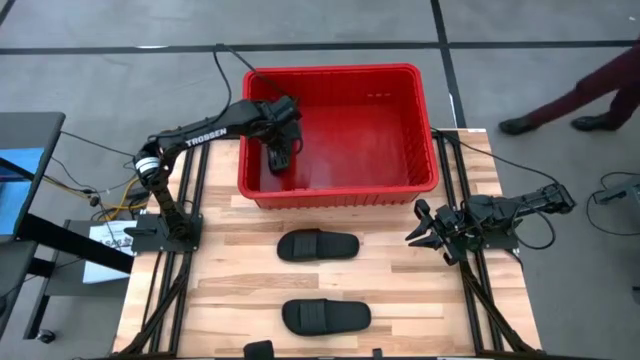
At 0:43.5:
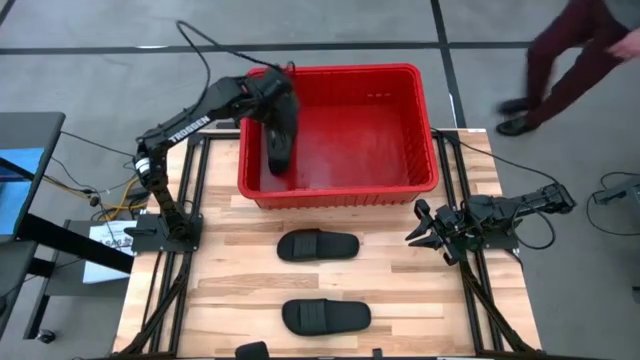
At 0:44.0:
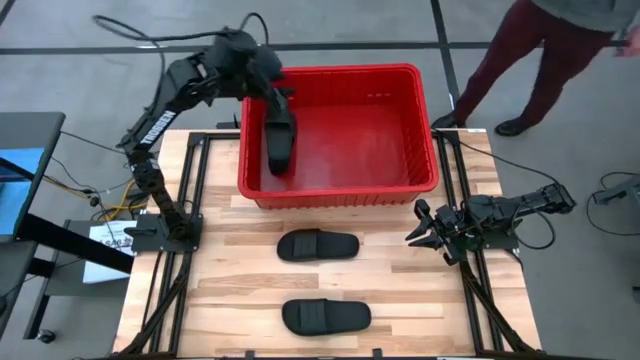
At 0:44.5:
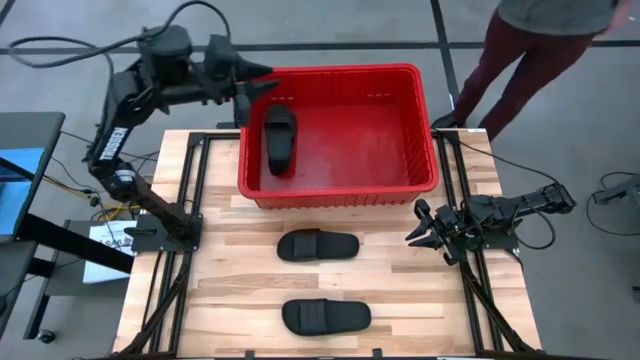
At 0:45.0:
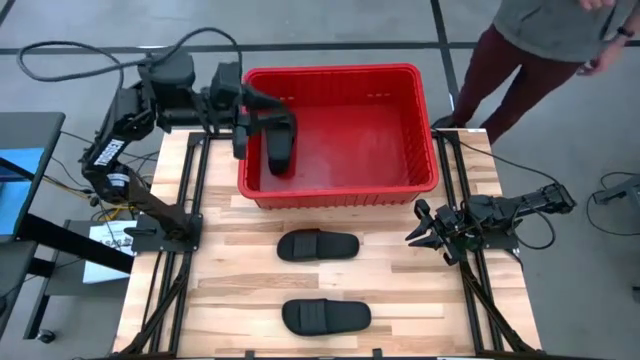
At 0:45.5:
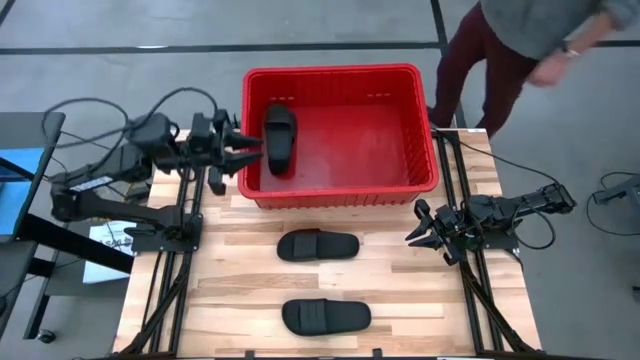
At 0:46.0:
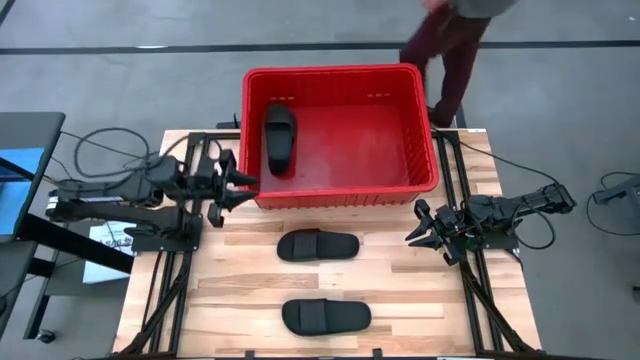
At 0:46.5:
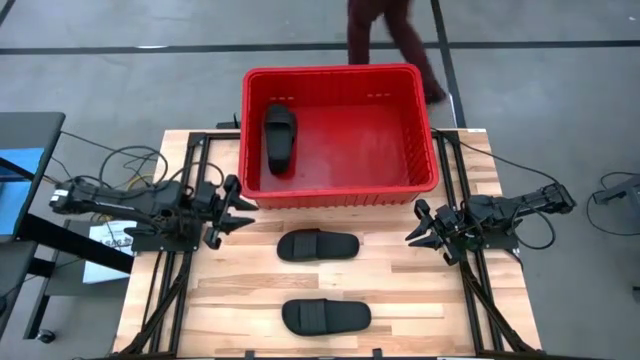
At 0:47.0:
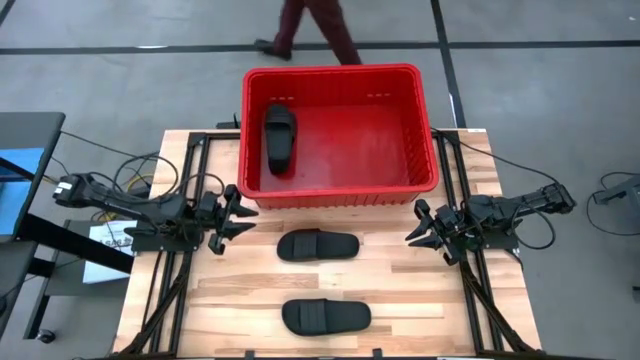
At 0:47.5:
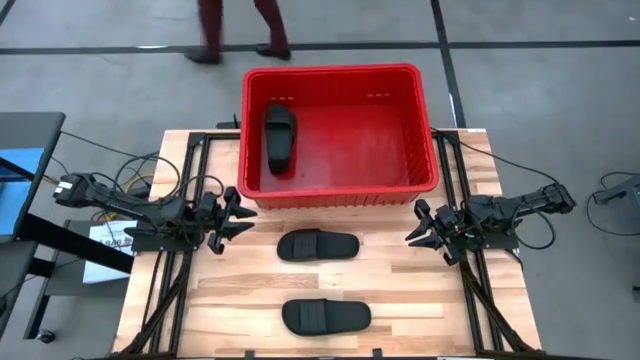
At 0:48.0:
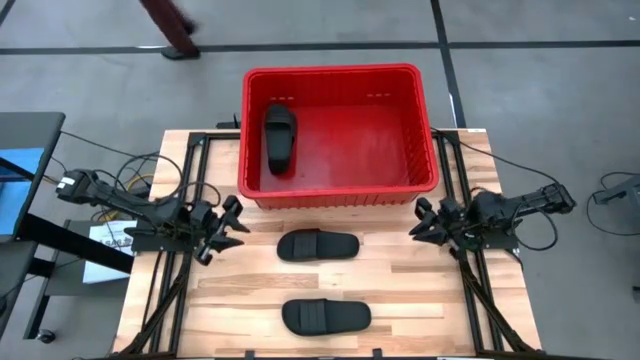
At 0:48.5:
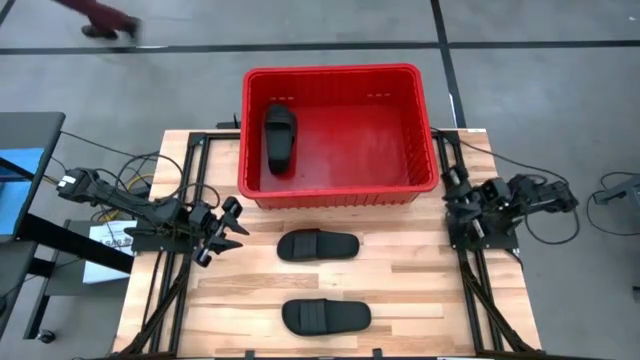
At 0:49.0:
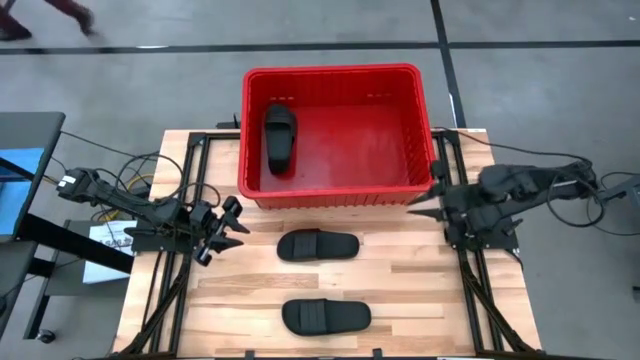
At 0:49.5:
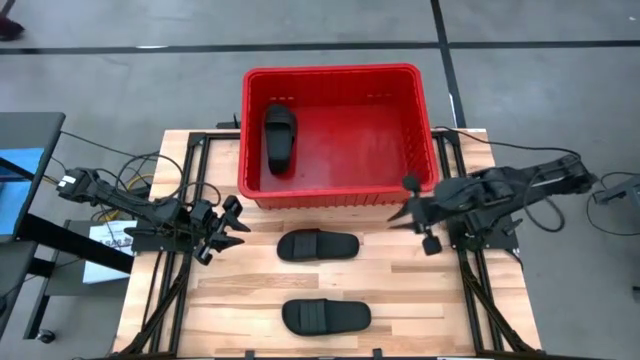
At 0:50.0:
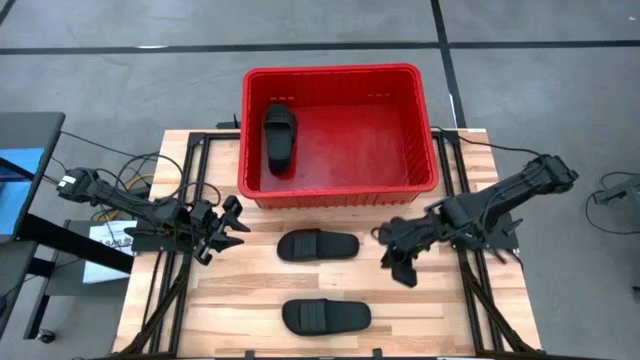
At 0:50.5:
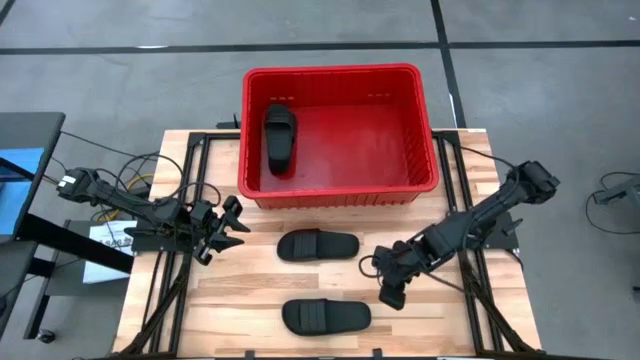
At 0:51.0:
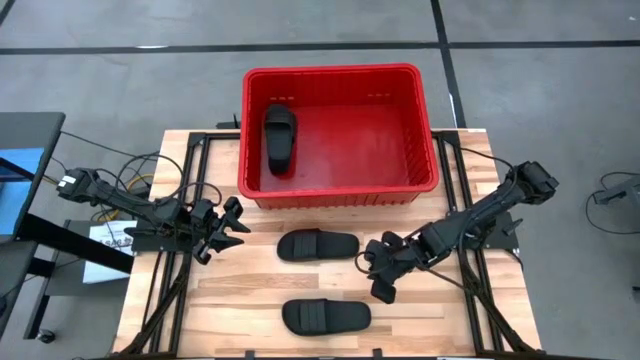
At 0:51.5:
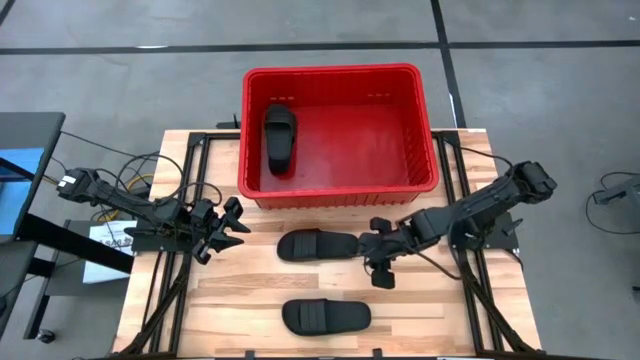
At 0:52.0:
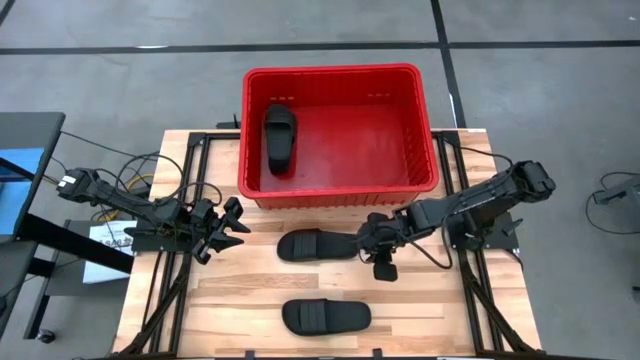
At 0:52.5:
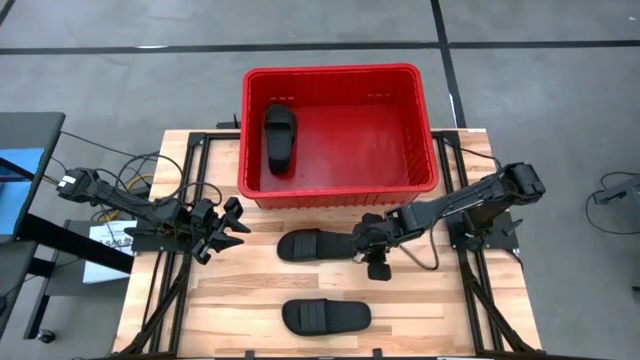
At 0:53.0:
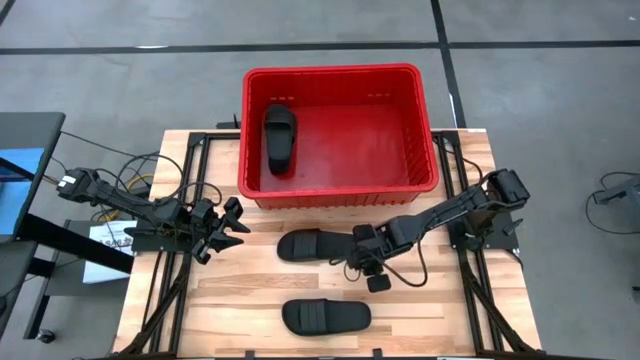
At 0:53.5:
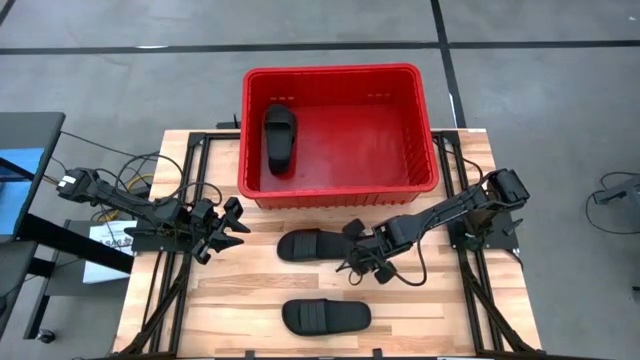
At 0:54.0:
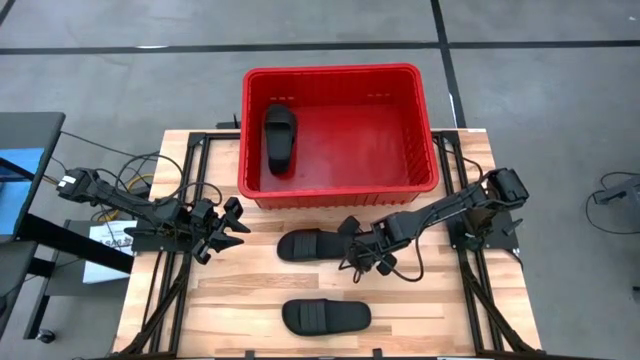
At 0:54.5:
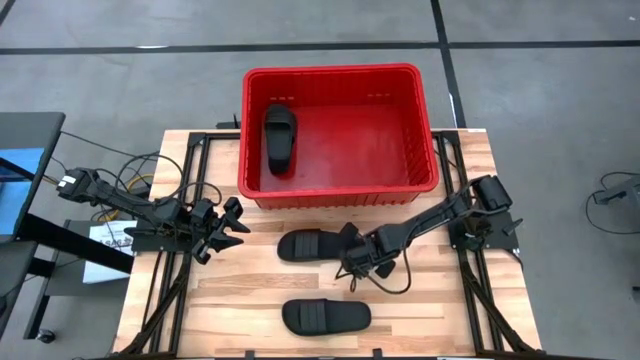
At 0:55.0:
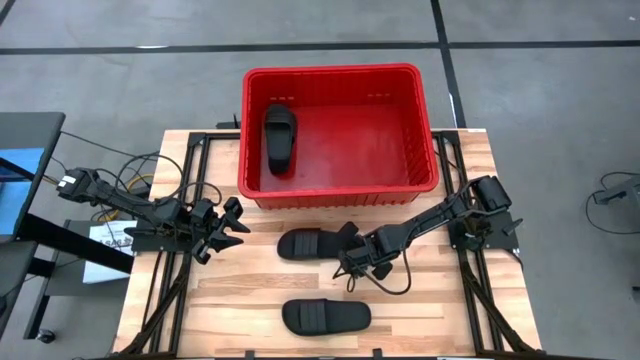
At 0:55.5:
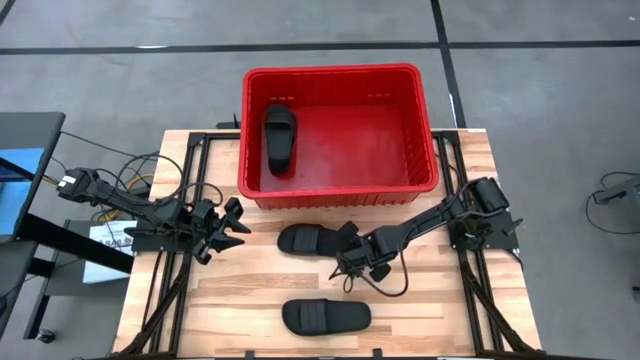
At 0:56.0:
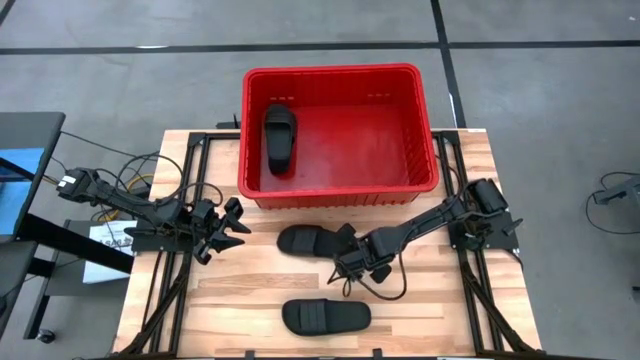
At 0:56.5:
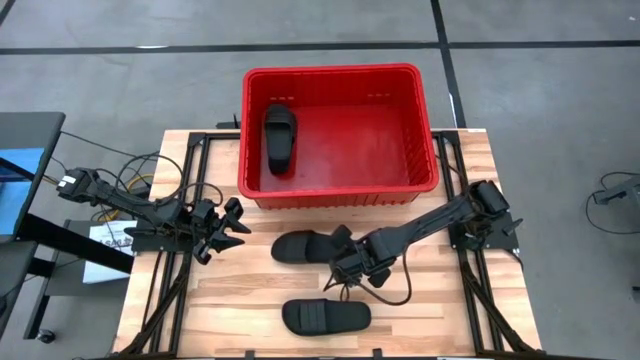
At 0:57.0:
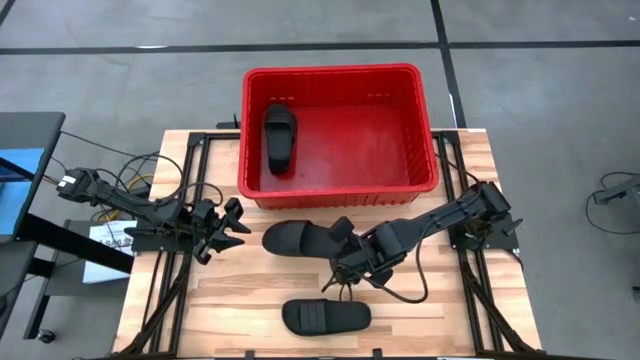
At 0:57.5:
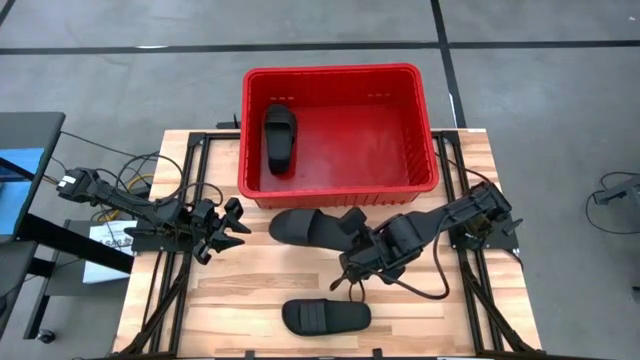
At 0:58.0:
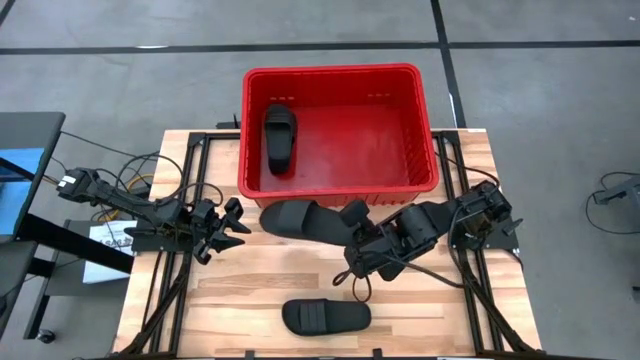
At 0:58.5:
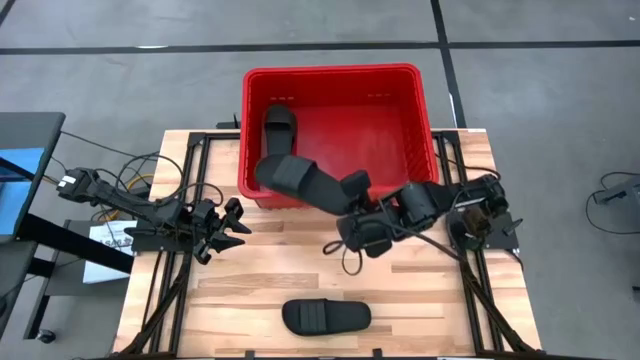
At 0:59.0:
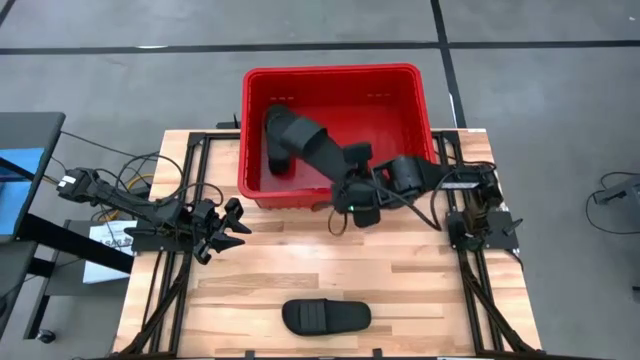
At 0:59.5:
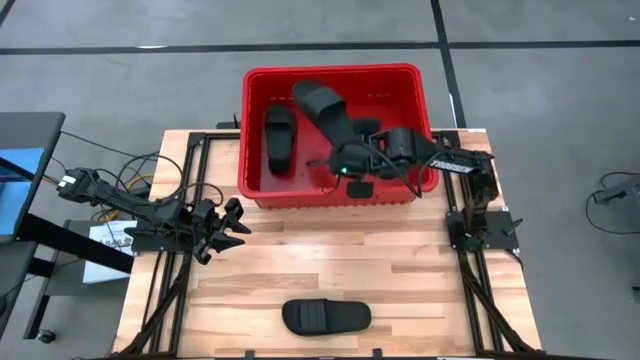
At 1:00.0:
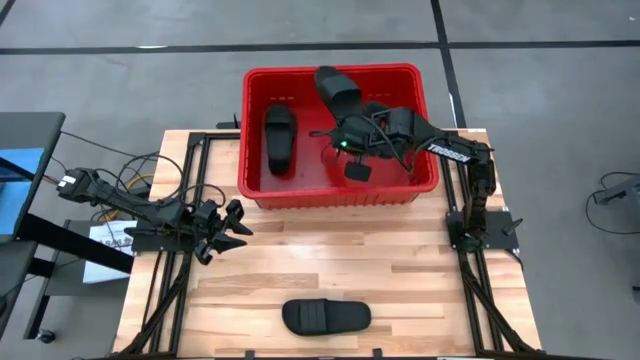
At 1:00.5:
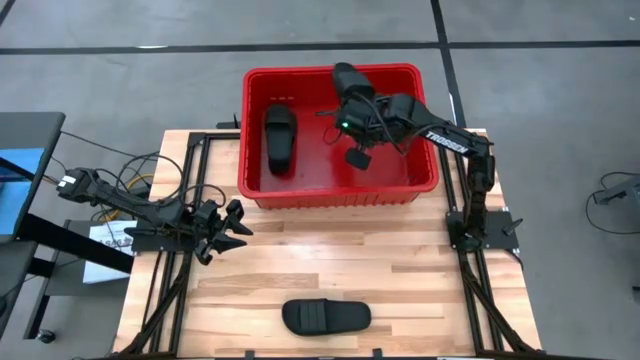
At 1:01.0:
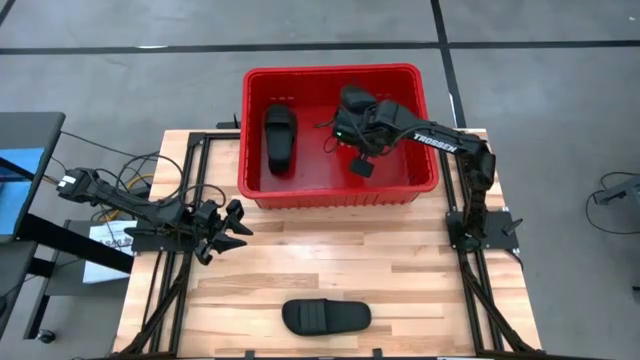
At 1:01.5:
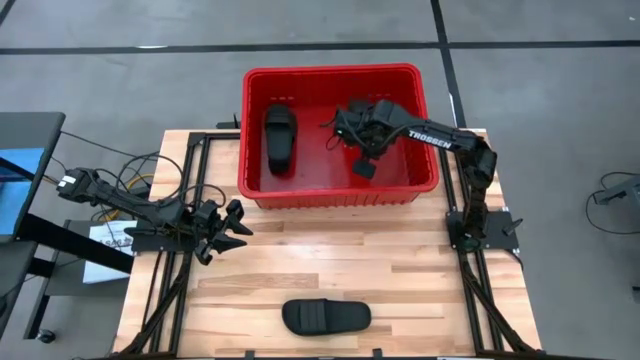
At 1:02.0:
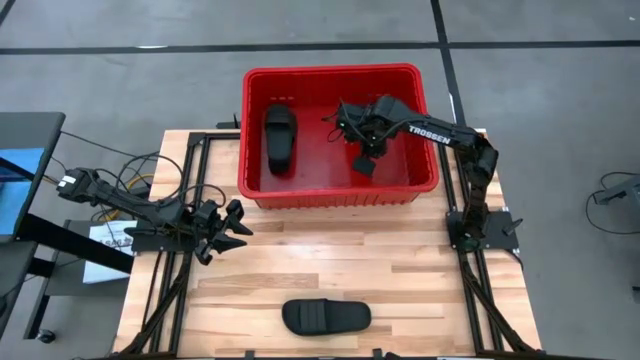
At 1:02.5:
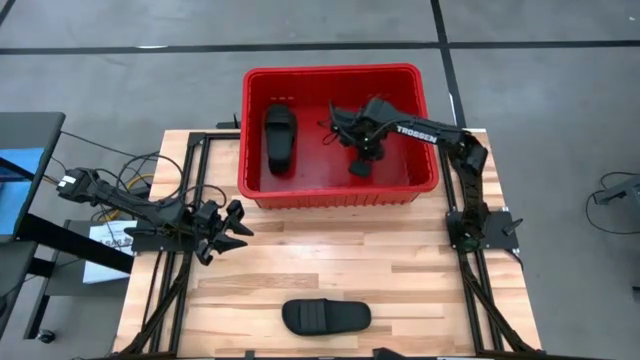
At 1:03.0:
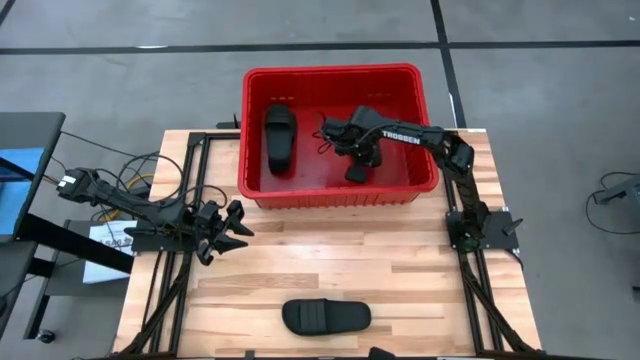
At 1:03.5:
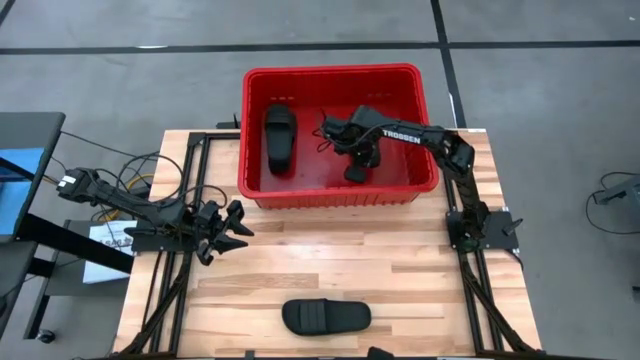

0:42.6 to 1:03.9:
Task: Pick and place slides into bin
Put the black slipper into the red bin

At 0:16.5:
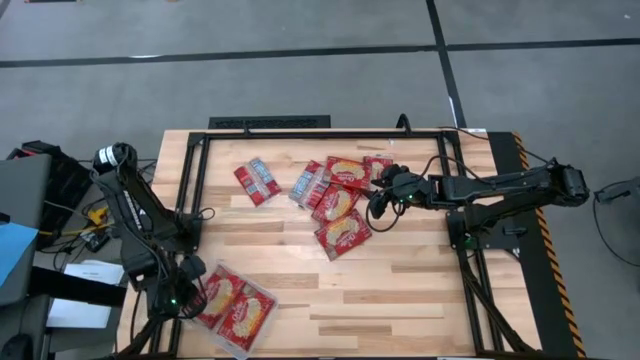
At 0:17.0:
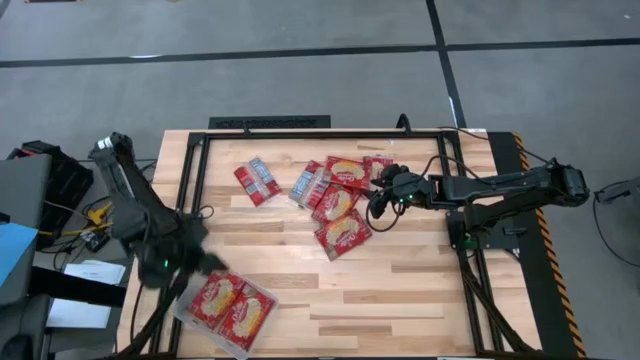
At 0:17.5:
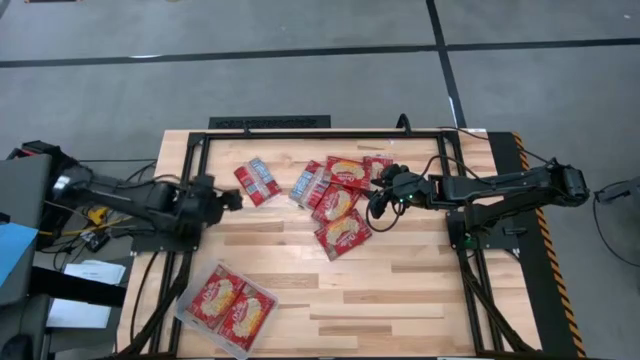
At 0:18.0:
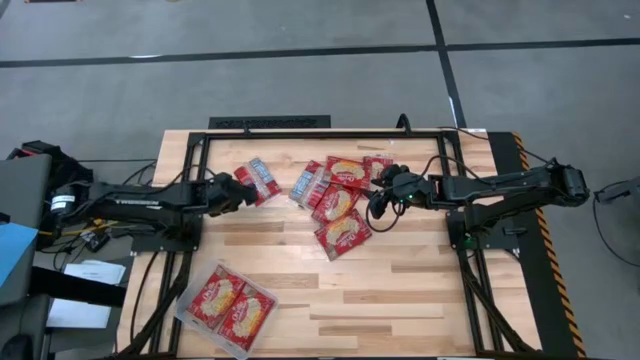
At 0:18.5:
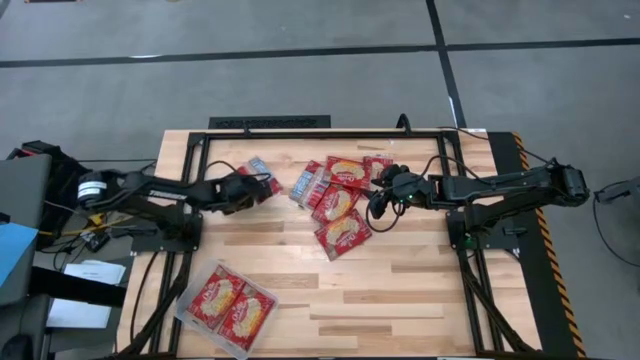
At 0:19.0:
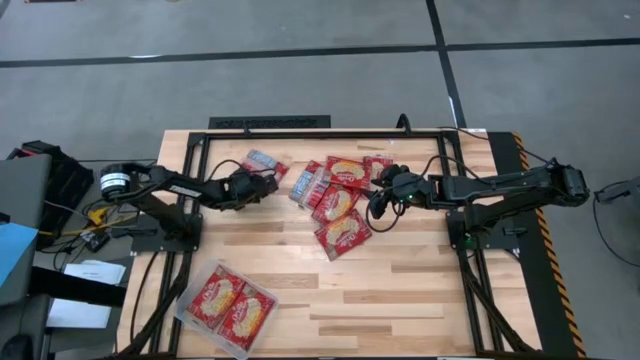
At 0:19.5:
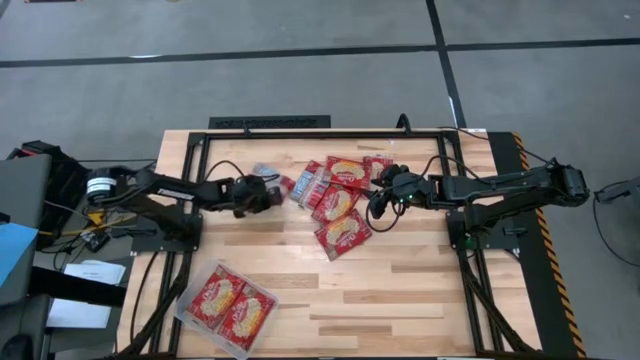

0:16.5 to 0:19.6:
Task: Sort popcorn bags into baskets
Put the red popcorn bag into the transparent bin
